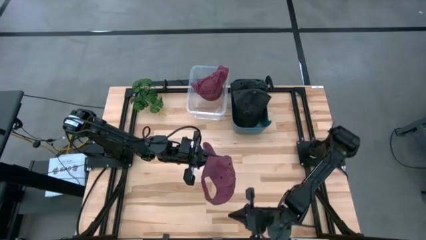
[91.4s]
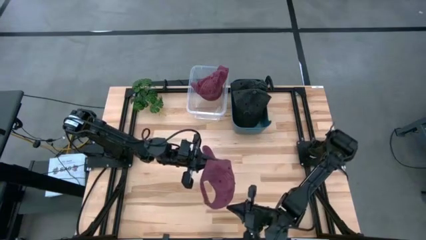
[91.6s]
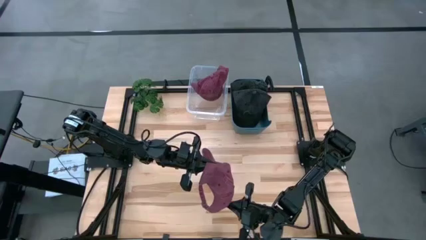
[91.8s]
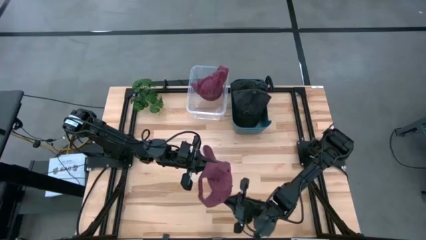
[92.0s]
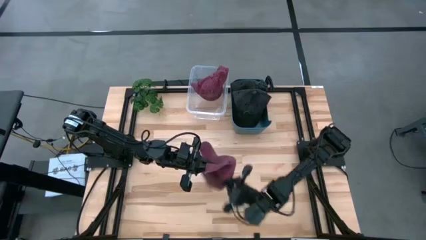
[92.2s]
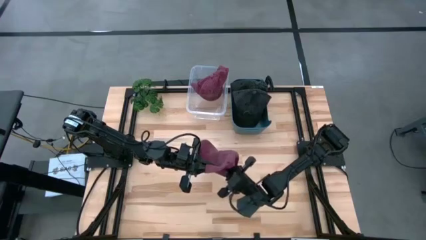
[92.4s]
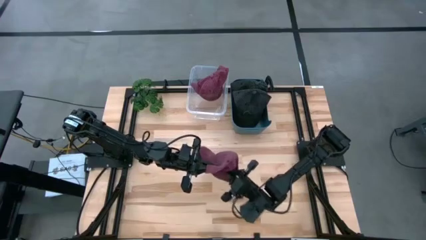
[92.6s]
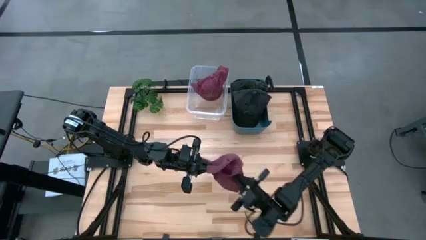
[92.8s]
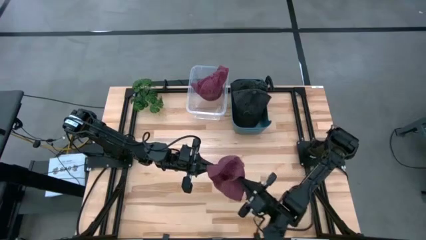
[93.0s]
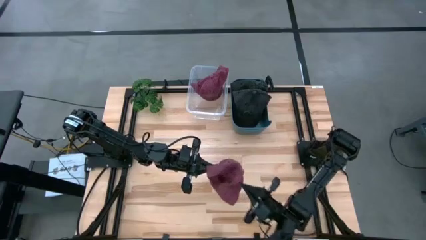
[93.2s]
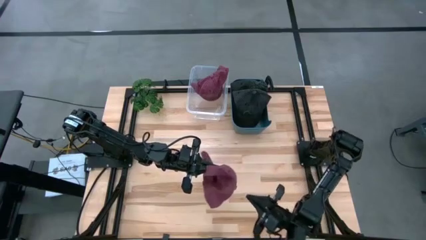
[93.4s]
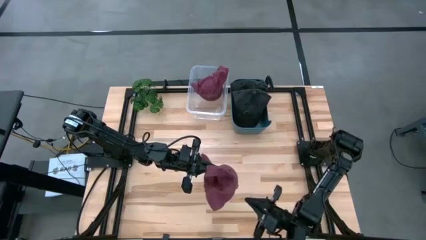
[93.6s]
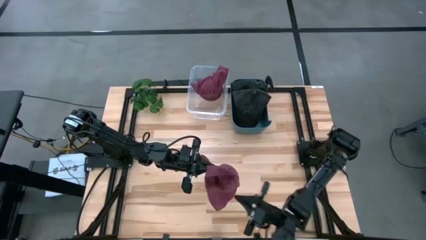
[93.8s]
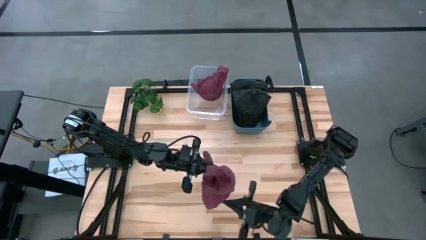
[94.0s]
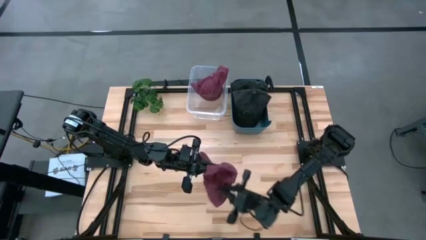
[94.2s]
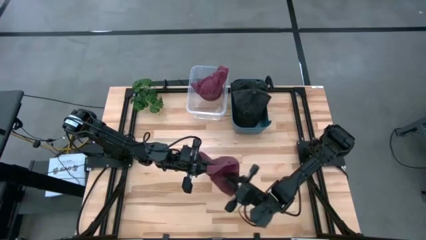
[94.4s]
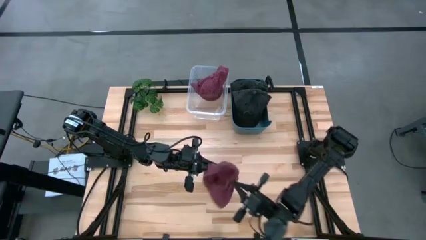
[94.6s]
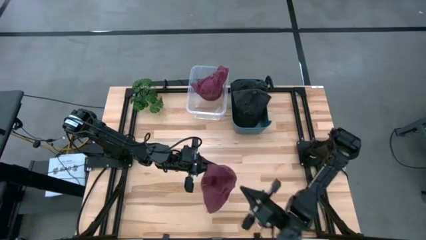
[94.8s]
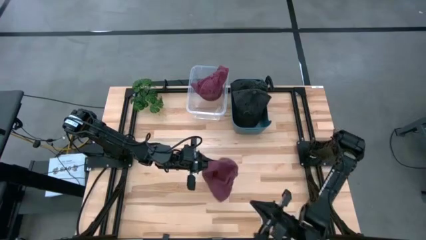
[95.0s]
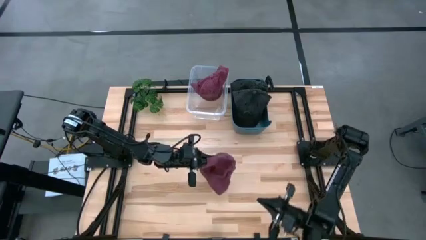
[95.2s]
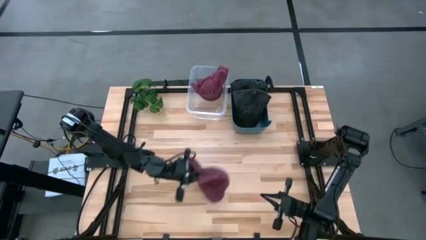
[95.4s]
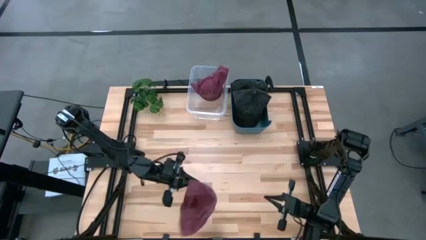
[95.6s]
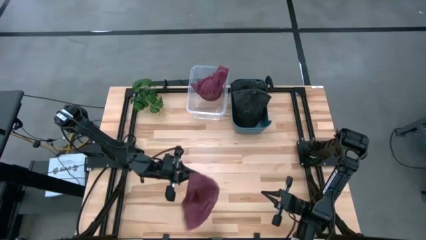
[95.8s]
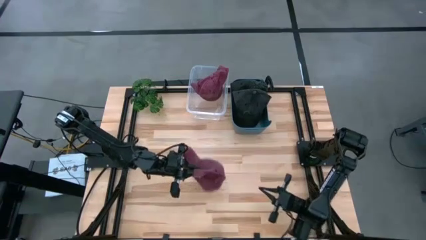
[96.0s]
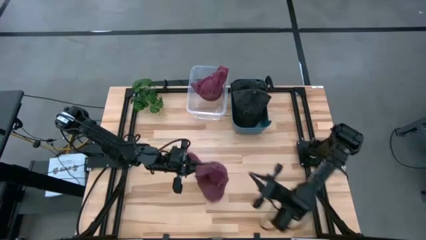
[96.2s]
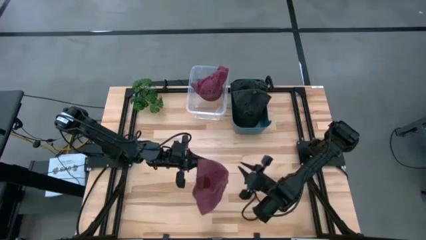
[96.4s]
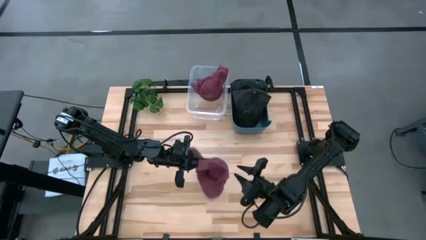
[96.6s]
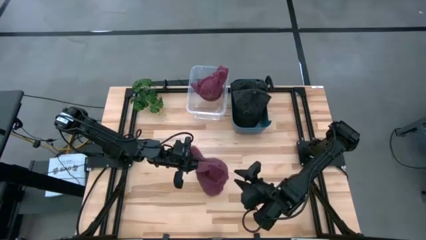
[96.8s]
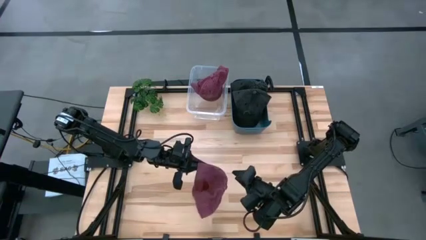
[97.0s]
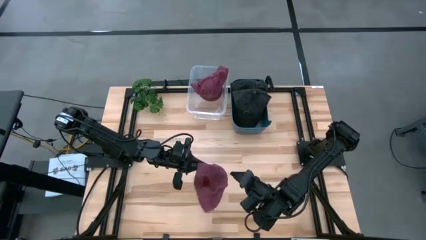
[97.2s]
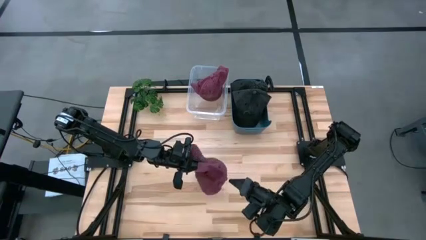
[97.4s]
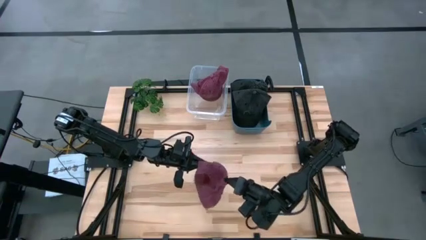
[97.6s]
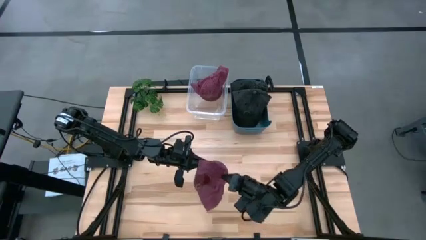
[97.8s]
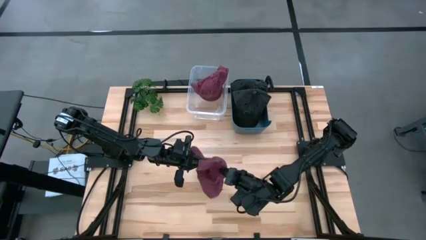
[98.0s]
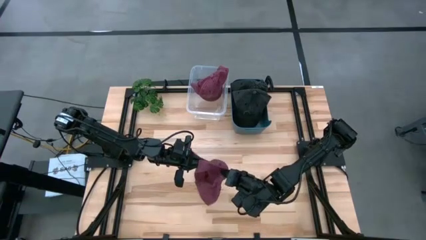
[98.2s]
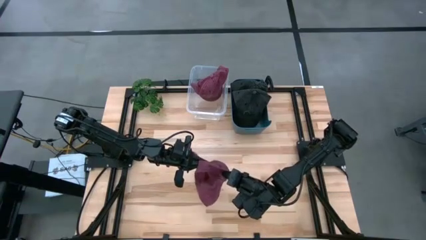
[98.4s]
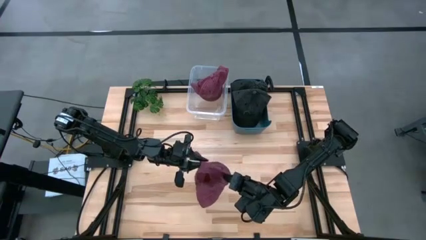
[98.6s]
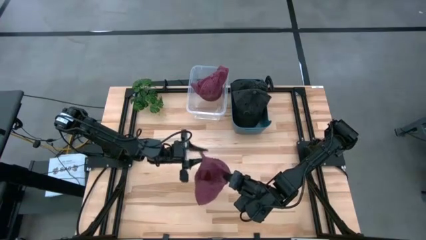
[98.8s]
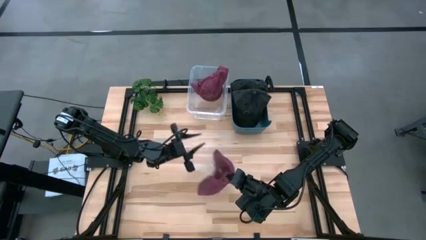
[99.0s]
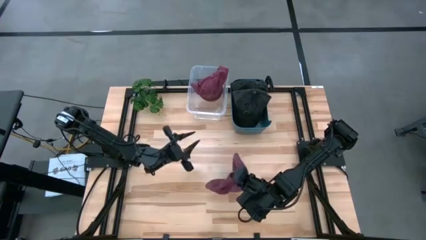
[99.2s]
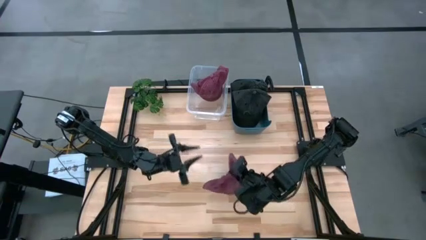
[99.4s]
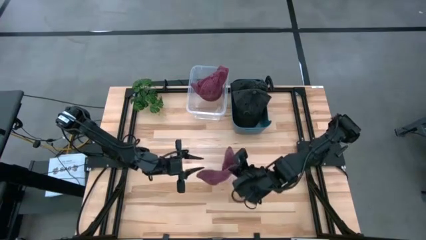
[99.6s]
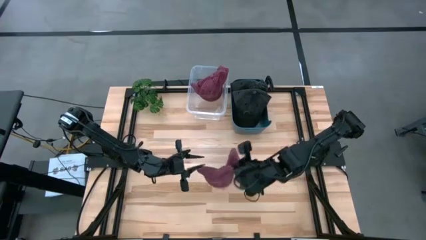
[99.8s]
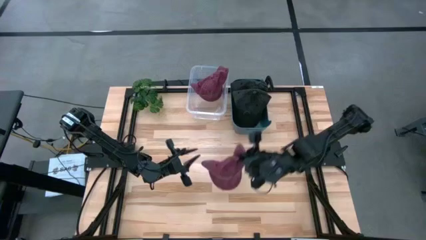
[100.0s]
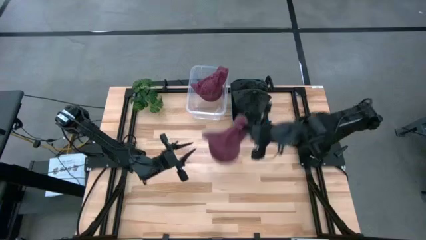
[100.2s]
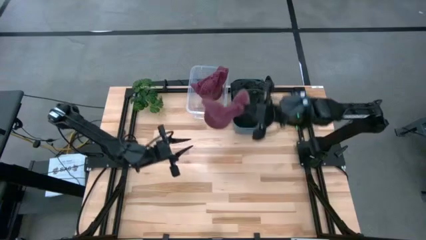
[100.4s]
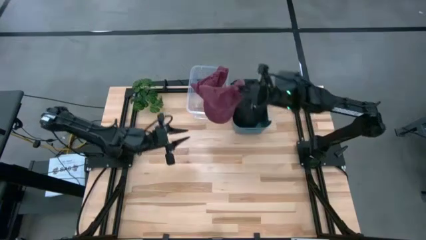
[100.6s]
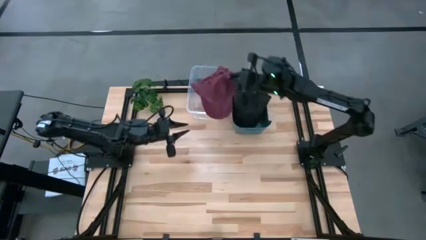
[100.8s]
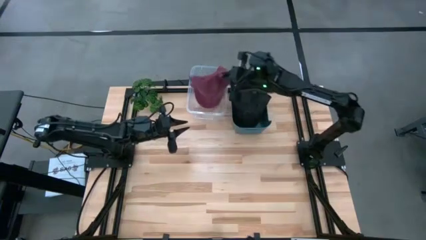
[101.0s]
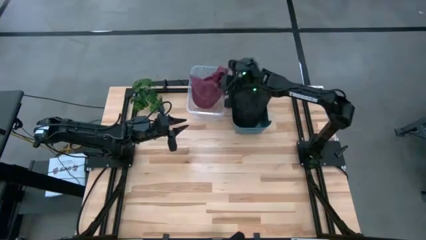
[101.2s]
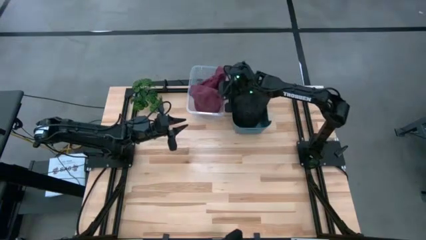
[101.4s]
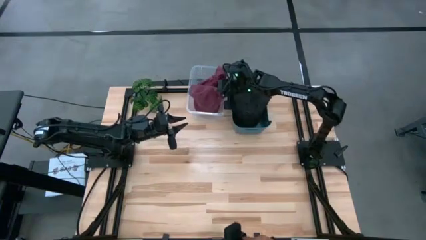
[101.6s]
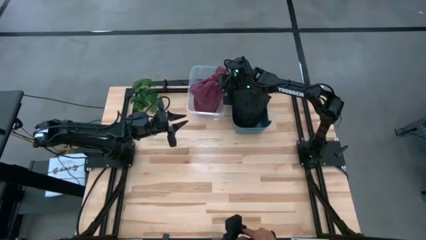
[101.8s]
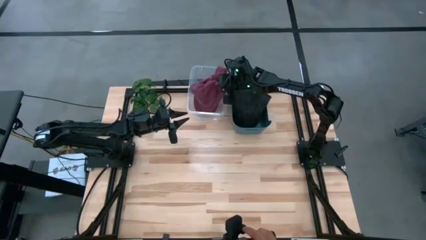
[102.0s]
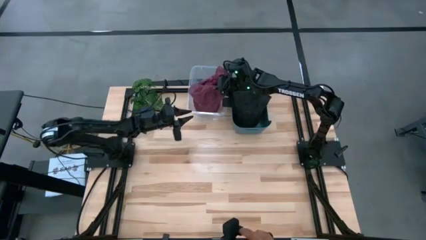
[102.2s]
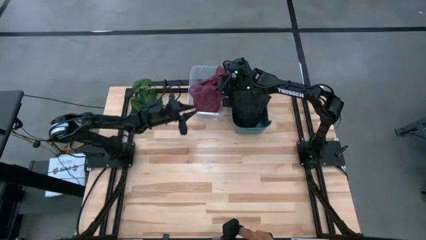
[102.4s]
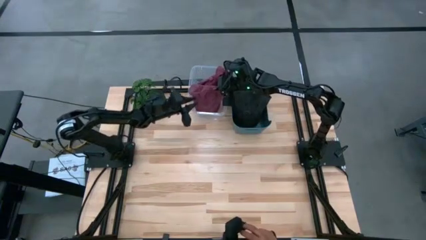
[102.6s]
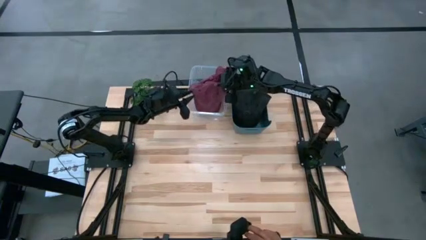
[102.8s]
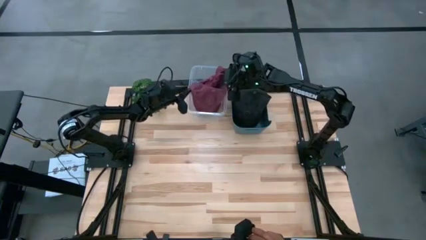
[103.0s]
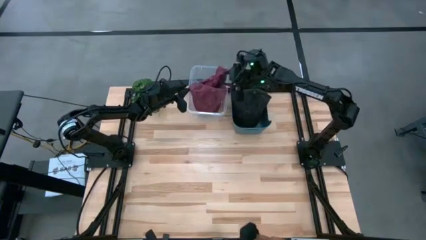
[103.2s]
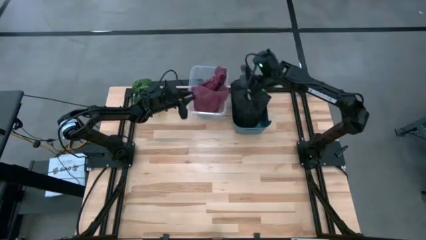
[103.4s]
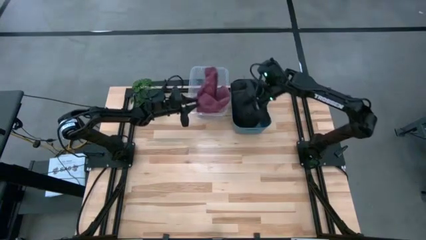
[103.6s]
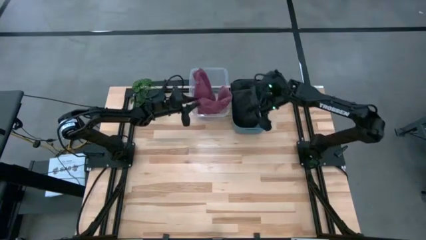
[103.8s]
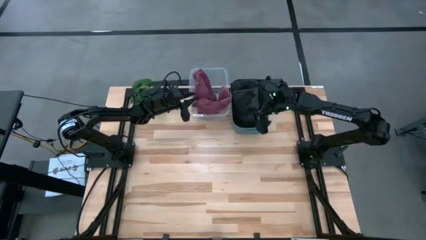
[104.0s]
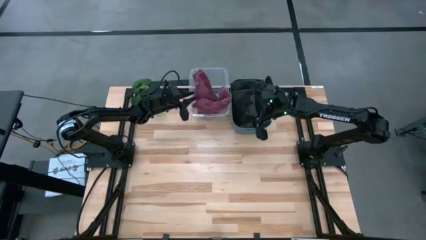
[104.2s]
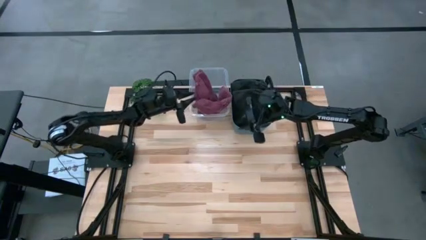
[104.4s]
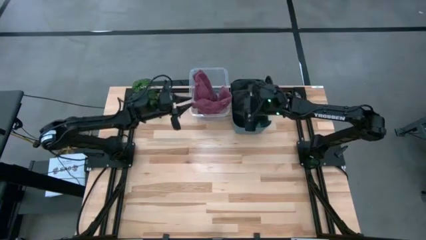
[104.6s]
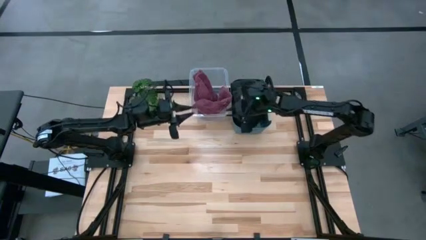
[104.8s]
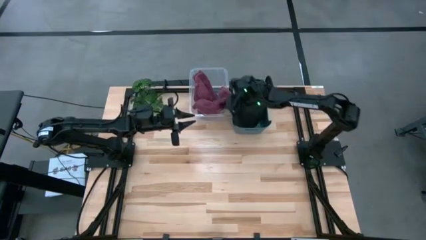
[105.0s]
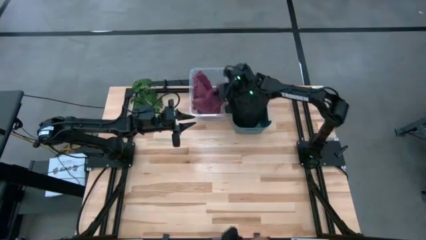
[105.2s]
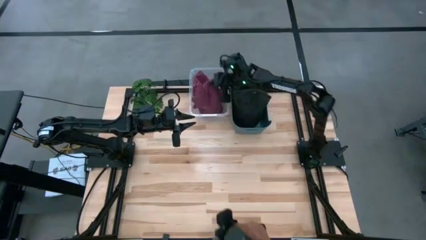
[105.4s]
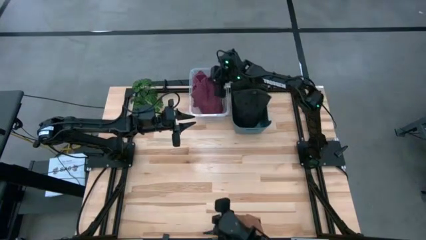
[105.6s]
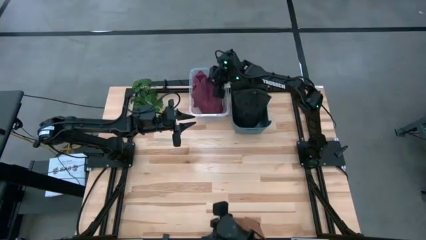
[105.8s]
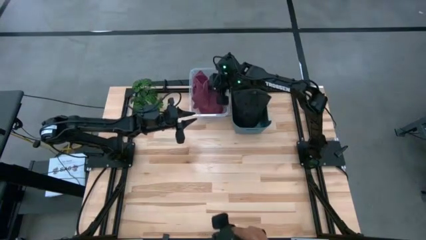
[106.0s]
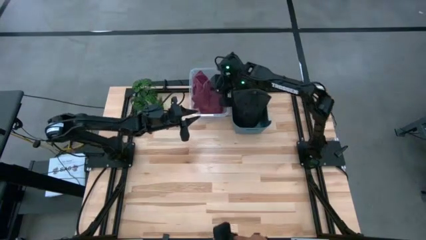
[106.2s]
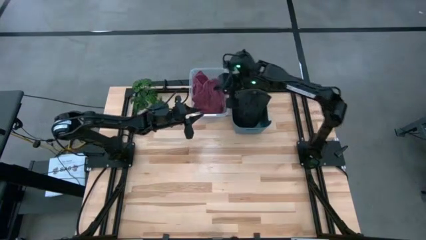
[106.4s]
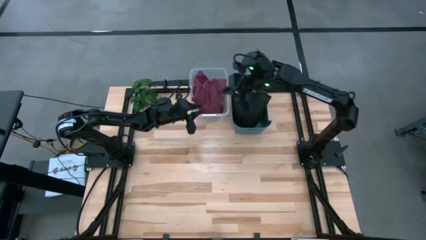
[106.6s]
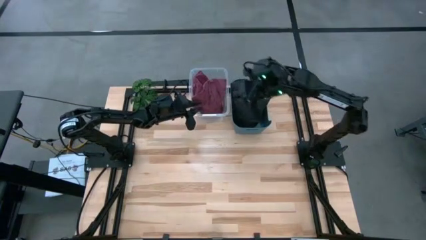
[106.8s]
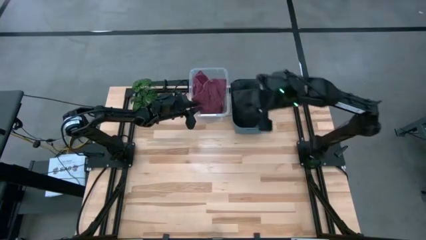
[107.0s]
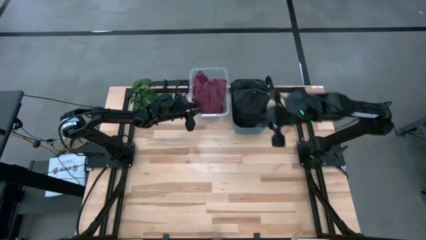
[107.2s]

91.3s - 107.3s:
Task: Pick & Place hat
Put the red cap into the transparent bin
